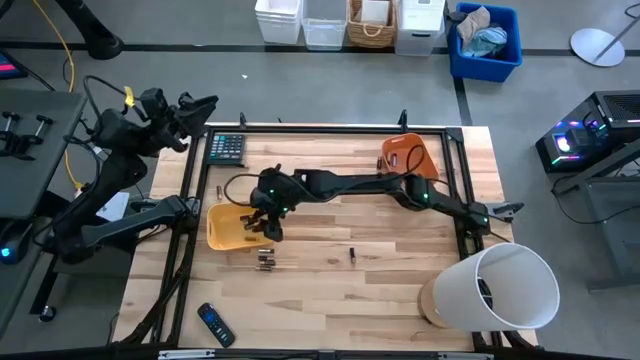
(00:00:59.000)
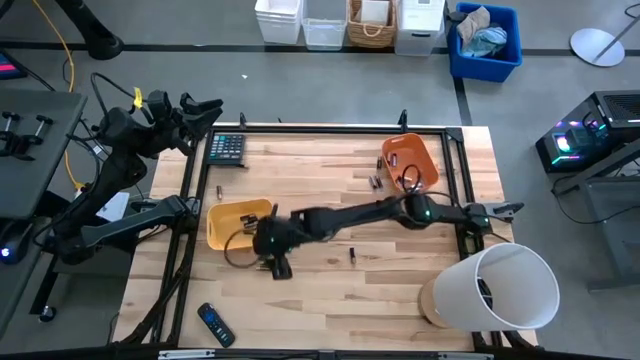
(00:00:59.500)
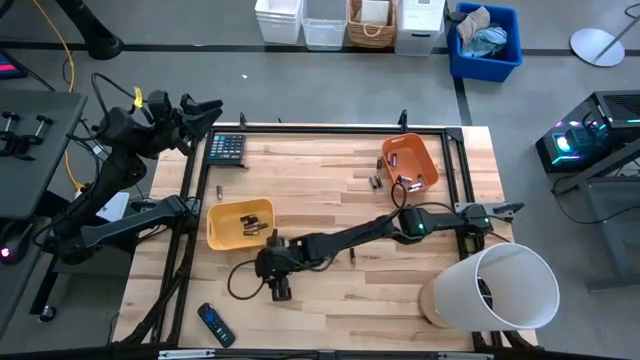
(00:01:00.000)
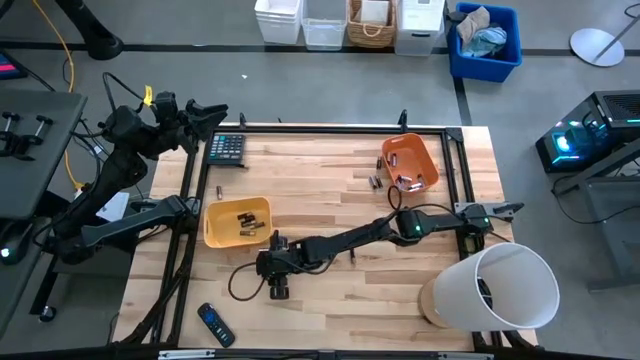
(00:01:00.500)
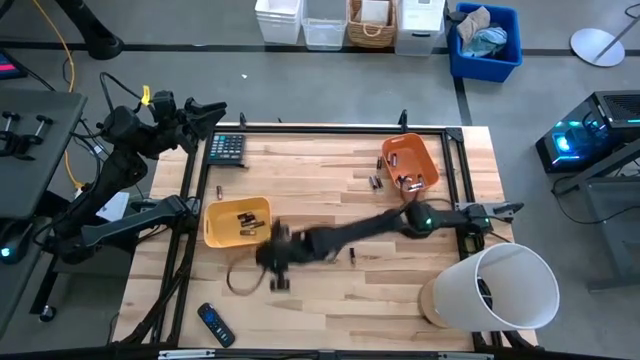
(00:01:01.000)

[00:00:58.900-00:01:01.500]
Task: Sort batteries
Put the black battery into the yellow bin

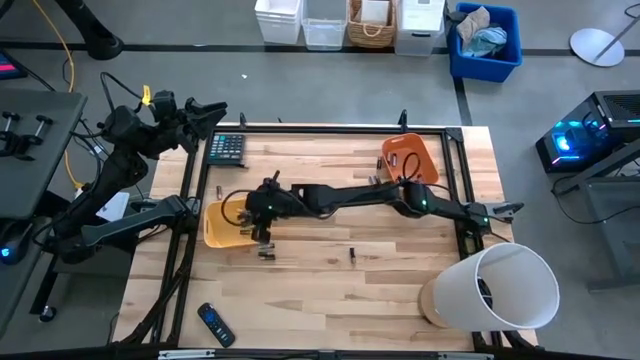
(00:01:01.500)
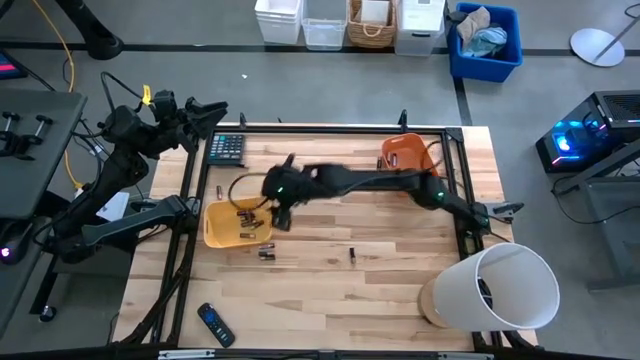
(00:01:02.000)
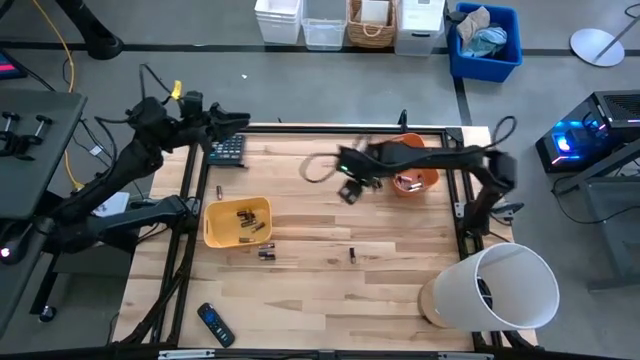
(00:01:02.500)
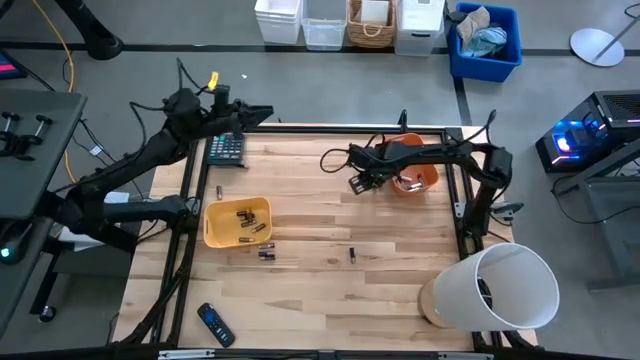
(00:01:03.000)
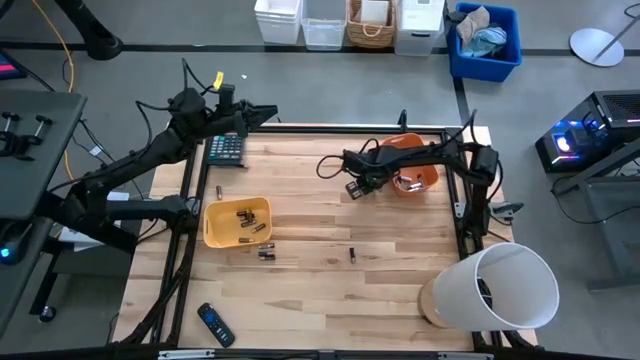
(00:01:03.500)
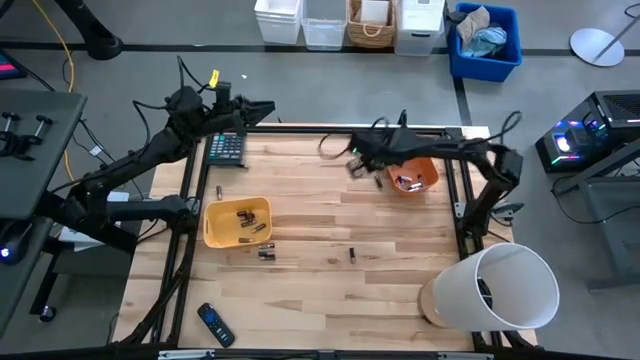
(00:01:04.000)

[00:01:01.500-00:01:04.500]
Put the silver battery into the orange bin

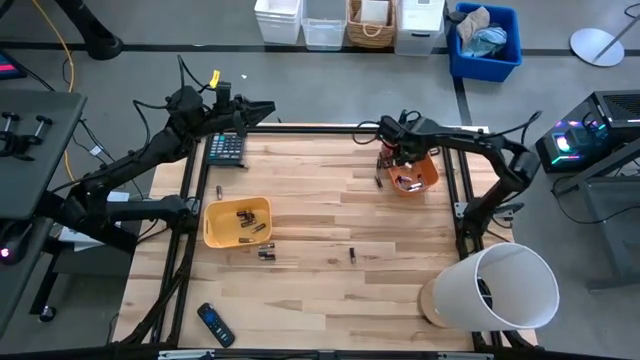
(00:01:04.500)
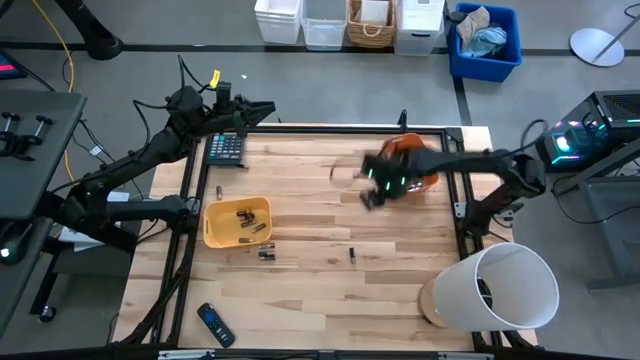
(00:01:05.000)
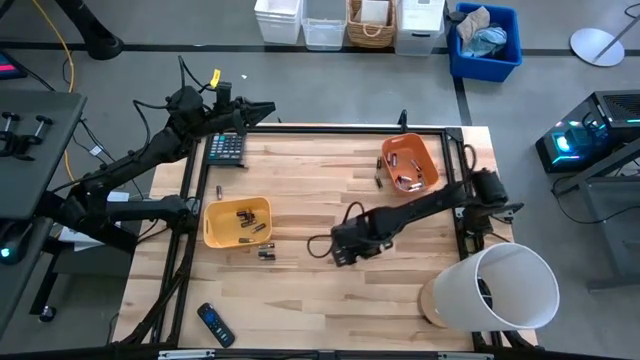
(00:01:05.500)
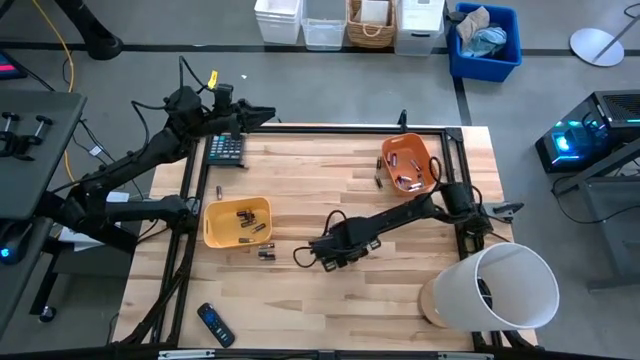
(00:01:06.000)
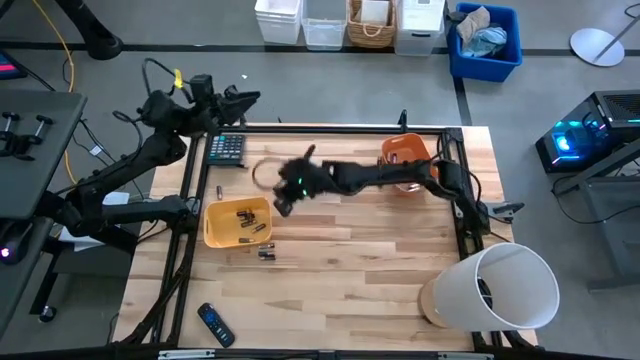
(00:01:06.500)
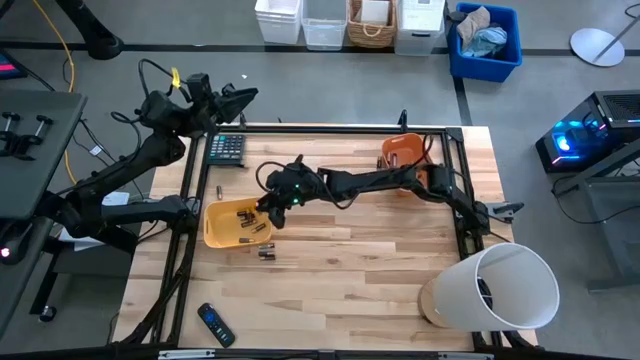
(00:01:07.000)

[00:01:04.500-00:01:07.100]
Put the black battery into the yellow bin

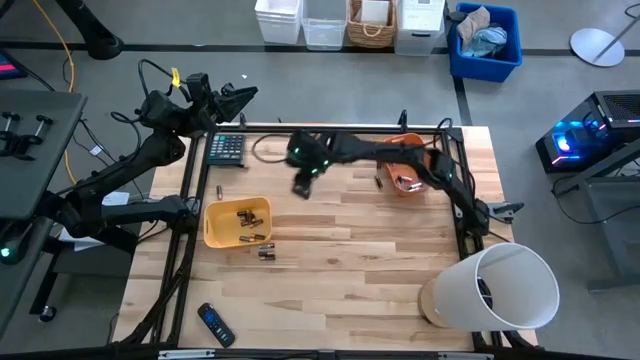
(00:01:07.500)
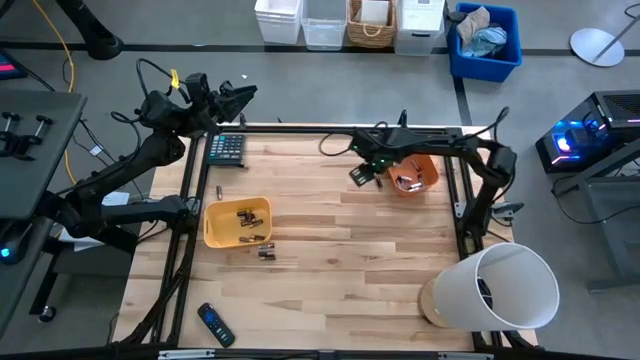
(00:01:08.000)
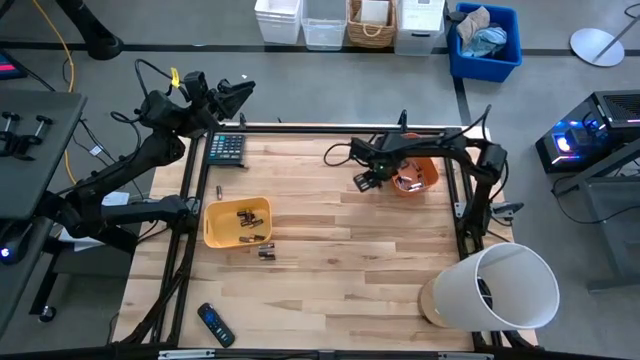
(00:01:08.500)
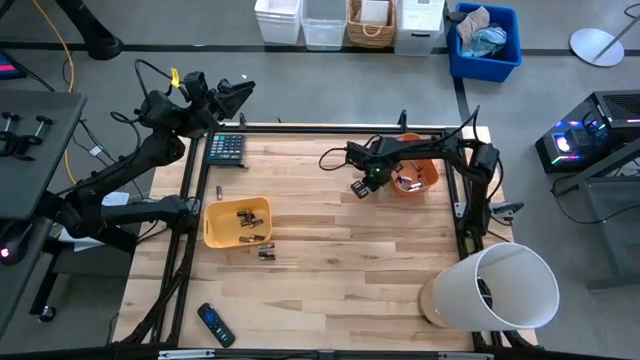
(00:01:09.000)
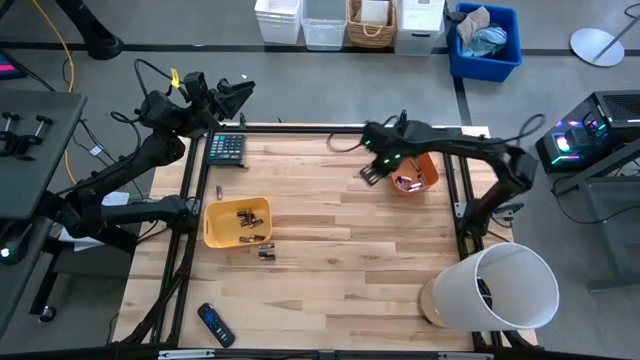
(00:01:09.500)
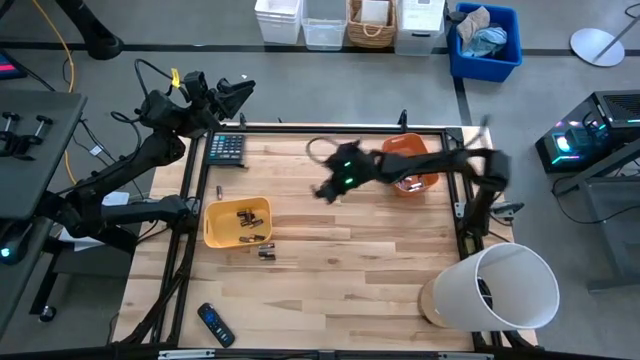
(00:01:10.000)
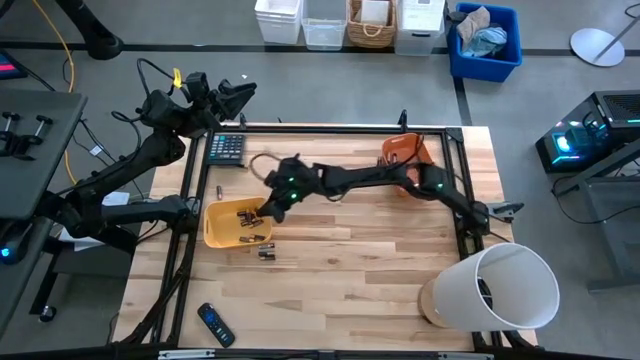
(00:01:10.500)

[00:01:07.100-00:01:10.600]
Put the black battery into the yellow bin

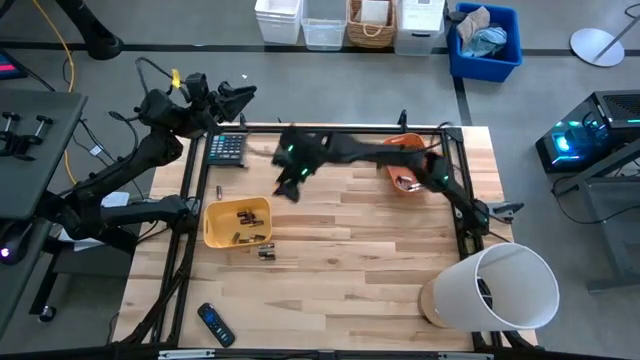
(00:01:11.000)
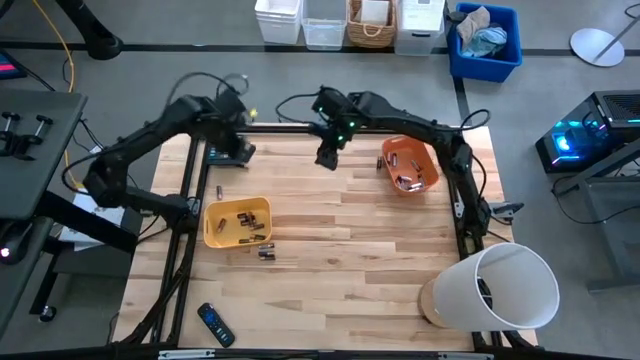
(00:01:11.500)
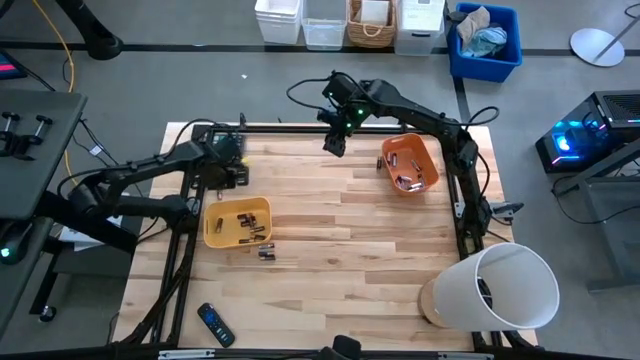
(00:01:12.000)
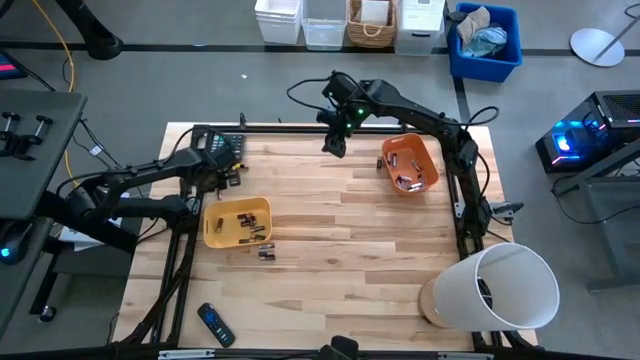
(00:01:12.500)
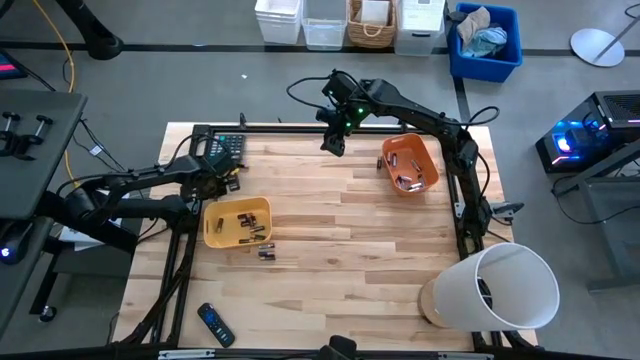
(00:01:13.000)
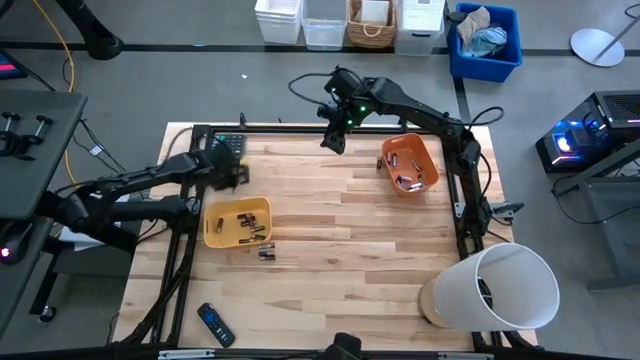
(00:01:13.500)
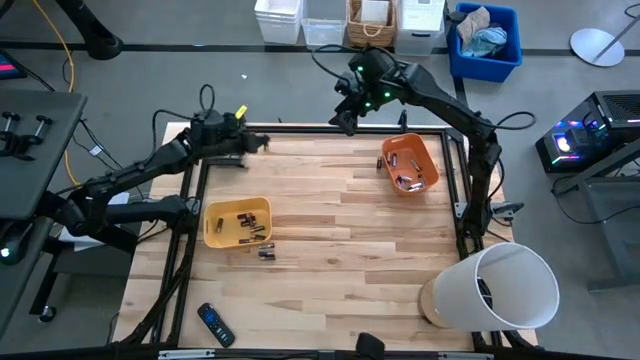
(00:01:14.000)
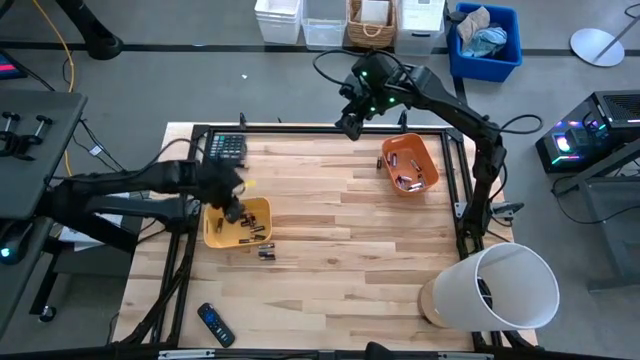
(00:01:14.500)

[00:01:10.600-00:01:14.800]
Put the black battery into the yellow bin

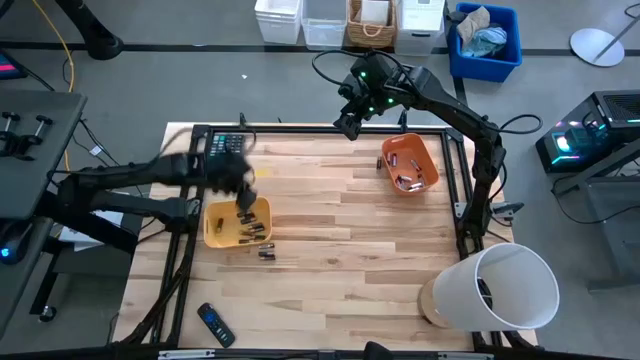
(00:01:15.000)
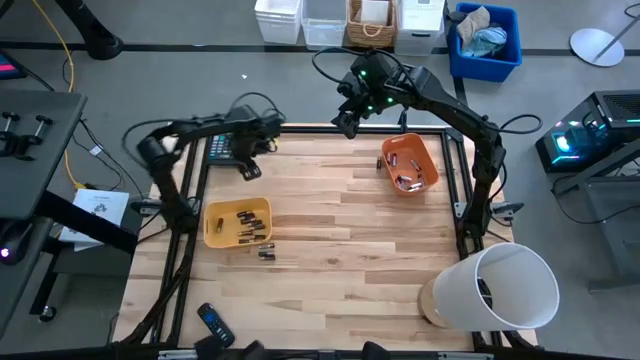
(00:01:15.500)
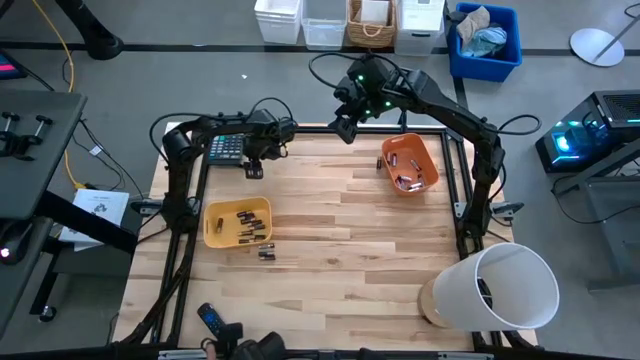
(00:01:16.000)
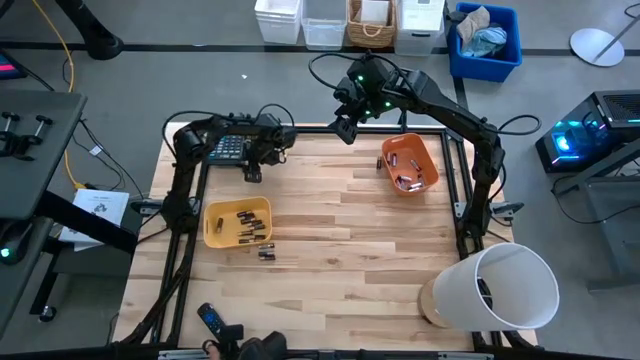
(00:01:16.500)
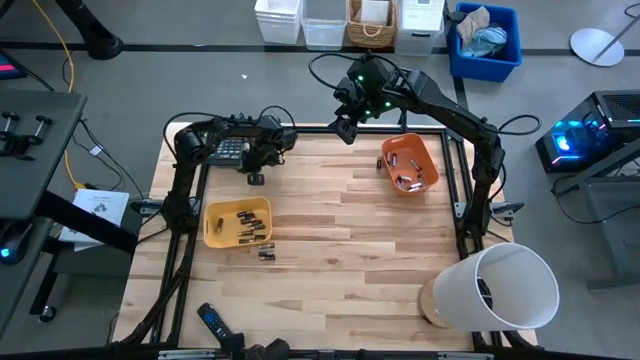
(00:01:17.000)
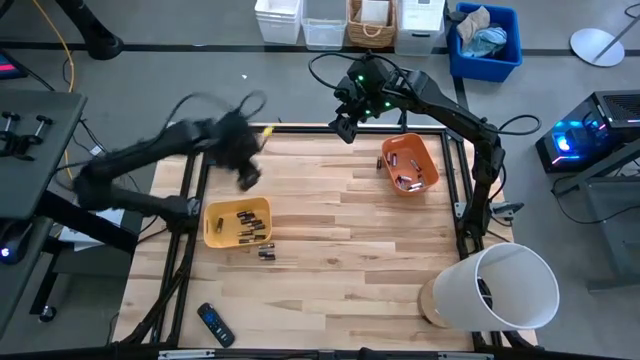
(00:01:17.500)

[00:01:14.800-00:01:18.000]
Put the black battery into the yellow bin

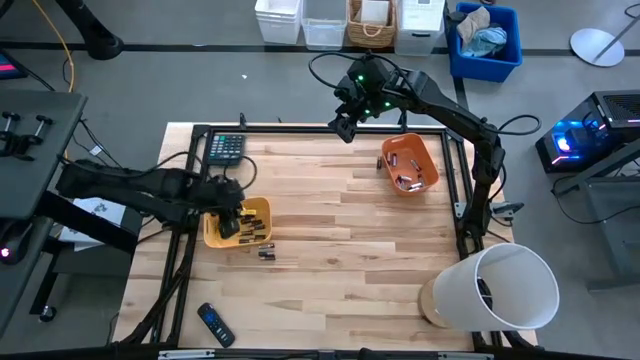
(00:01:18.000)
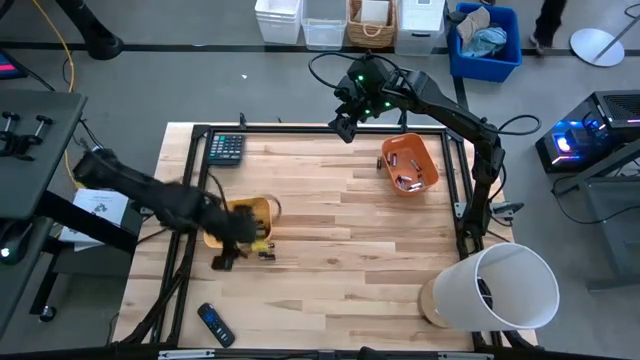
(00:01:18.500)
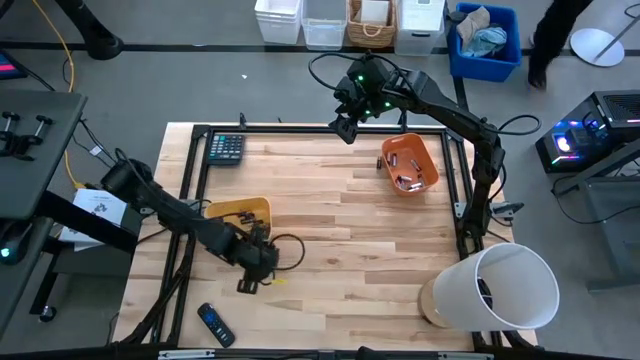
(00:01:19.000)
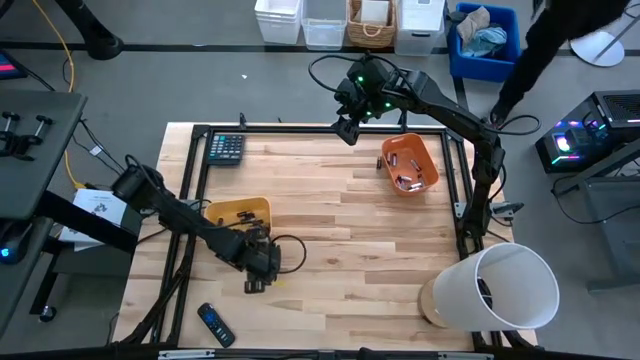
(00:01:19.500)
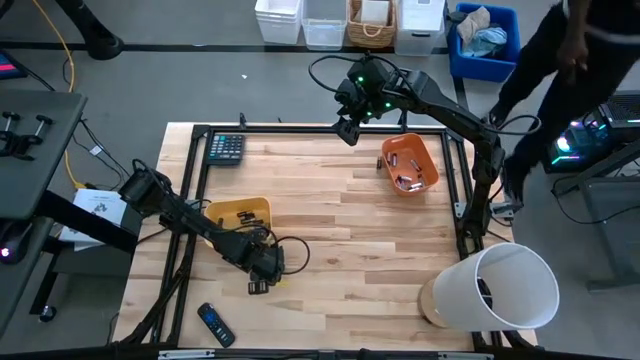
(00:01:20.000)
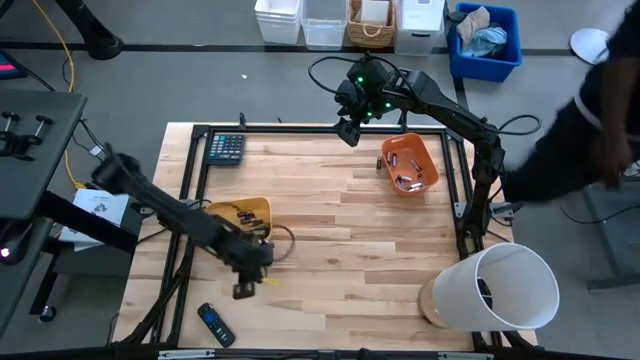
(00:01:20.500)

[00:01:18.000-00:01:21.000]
Put the black battery into the yellow bin
